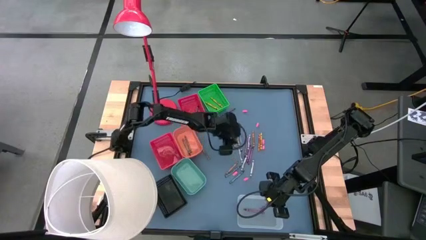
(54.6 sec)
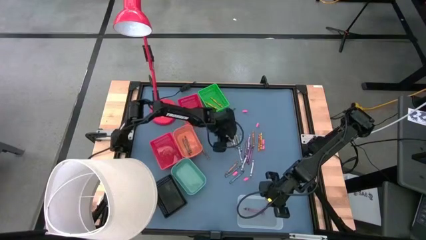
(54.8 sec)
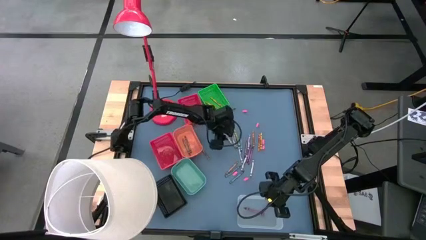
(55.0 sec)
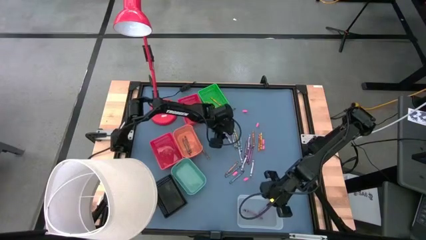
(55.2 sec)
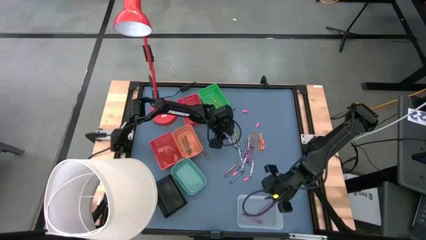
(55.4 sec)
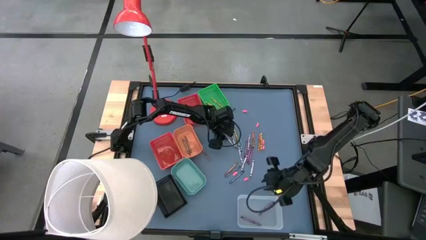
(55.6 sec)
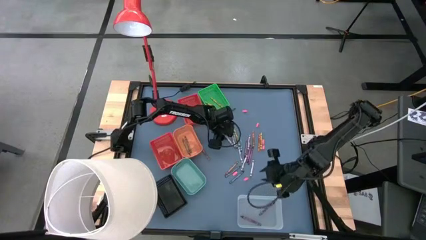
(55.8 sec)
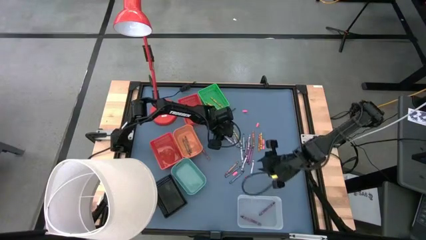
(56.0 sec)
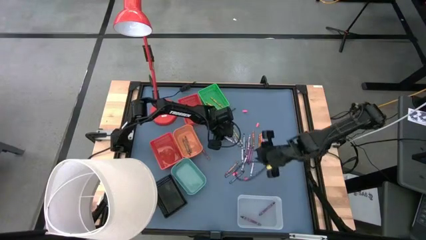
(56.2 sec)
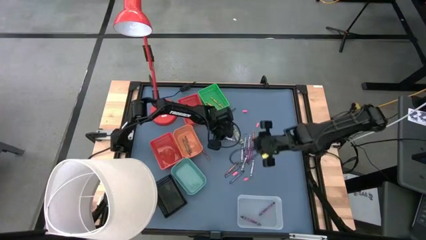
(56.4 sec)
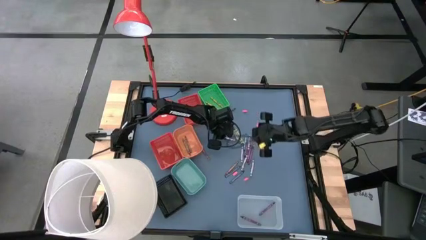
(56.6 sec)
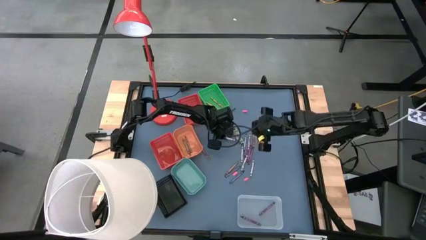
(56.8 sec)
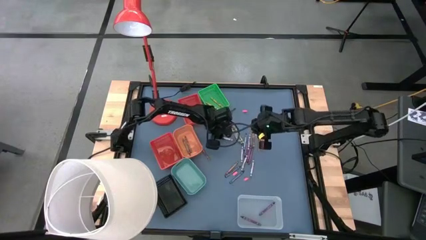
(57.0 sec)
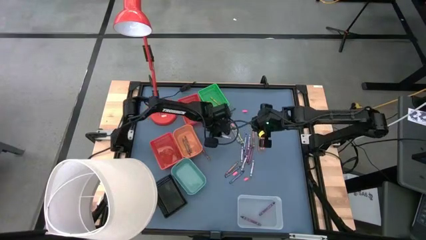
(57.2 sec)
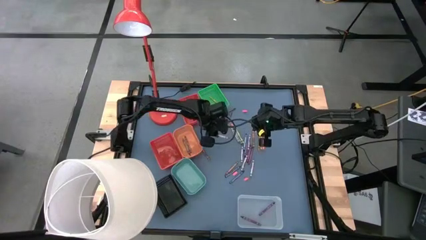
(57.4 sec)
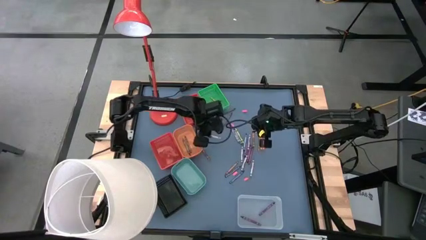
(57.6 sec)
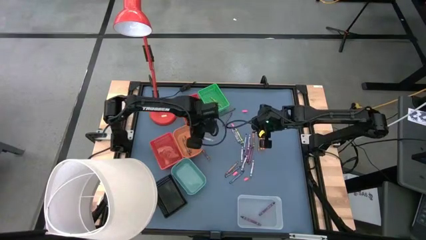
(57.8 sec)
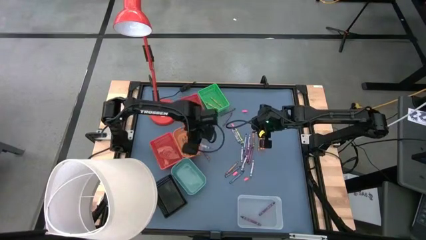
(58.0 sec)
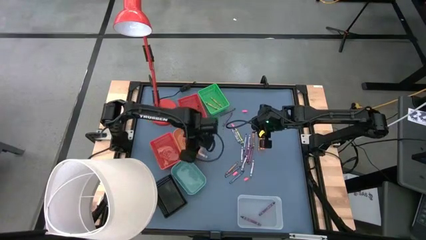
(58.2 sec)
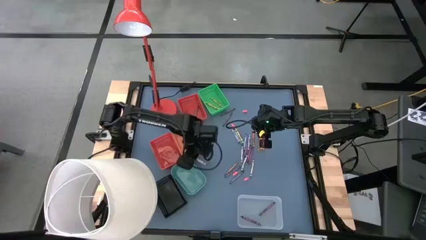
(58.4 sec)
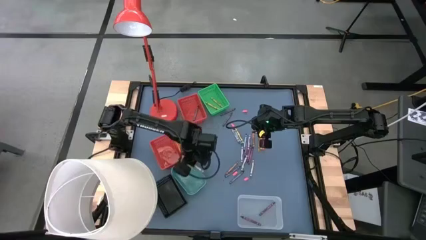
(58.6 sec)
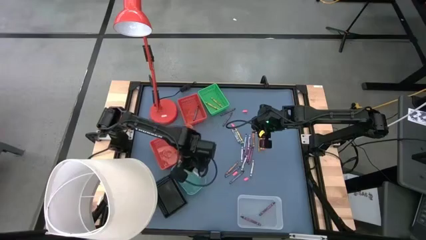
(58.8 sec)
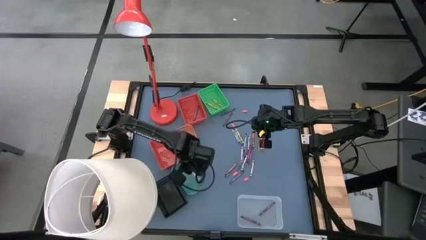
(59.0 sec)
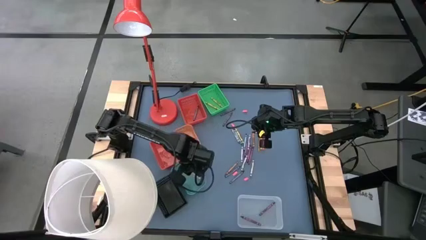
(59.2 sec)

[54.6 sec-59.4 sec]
Task: Sort crayons
Put the gray crayon into the light green bin

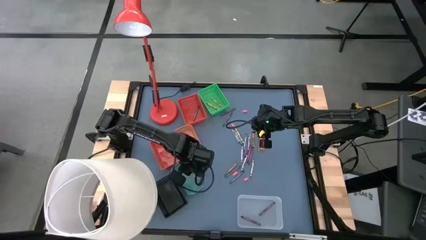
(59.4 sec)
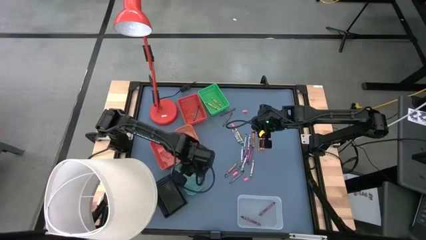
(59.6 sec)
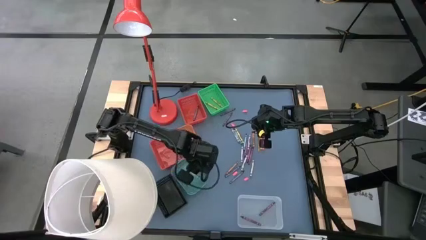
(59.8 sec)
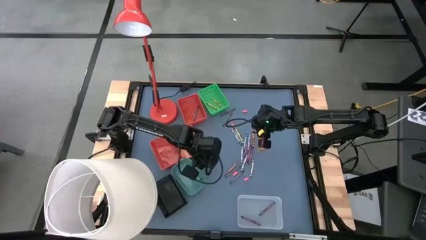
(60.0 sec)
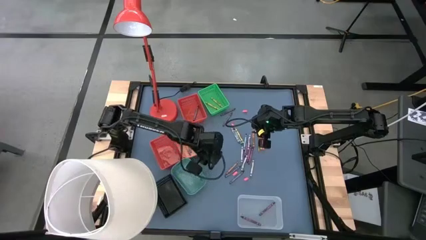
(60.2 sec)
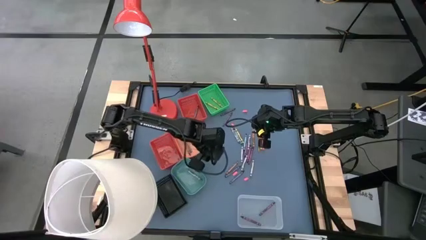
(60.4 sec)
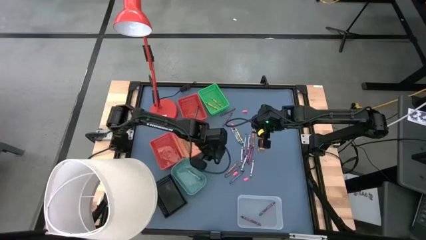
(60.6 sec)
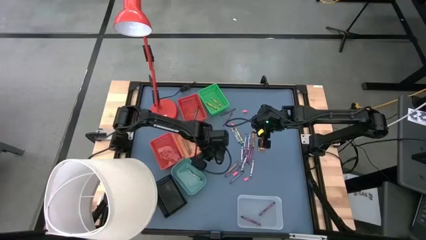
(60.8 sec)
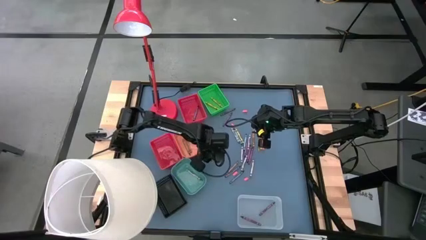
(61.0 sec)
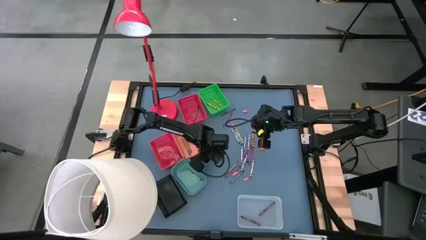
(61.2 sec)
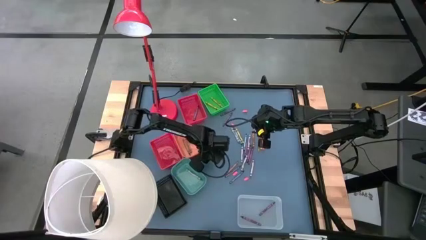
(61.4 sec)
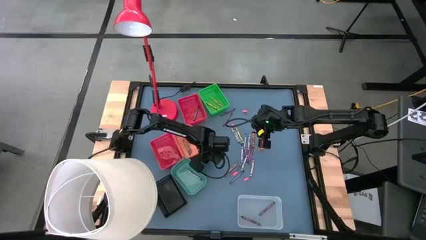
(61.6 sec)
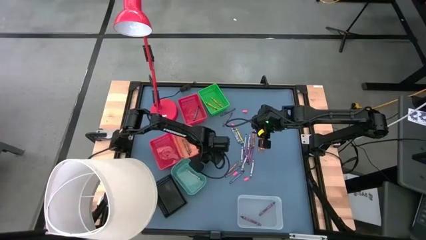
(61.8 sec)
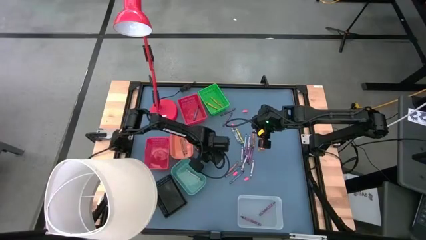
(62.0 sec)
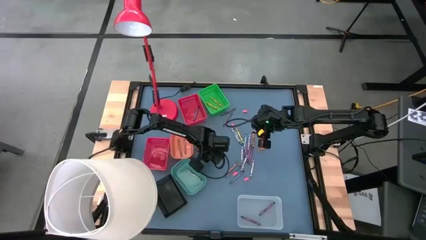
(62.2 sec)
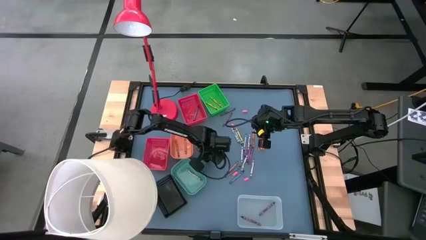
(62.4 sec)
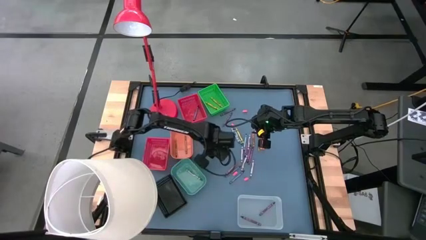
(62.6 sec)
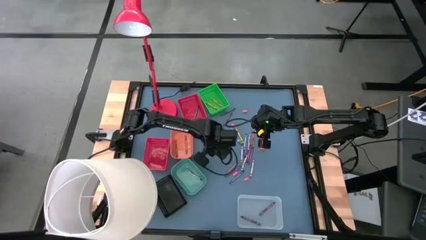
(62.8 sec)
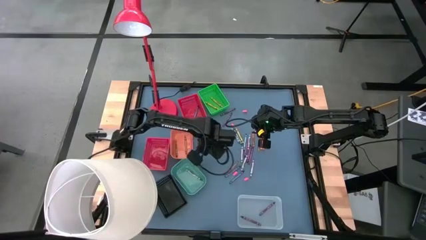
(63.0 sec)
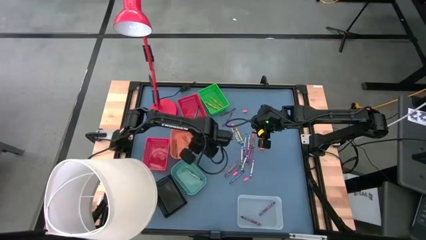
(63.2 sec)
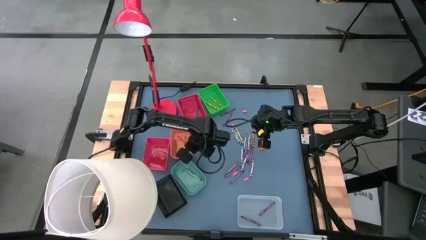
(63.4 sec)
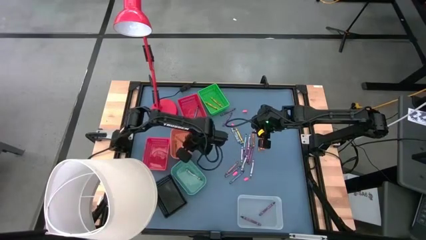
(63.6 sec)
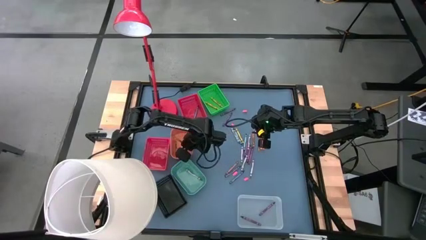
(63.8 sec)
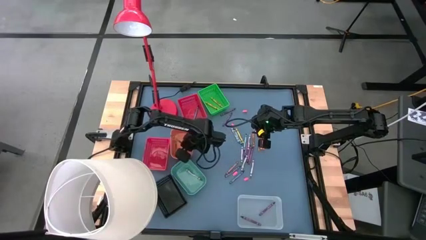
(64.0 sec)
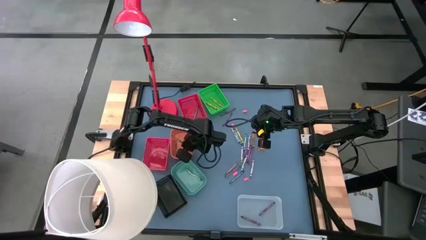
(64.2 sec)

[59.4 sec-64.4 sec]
Put the brown crayon into the orange bin

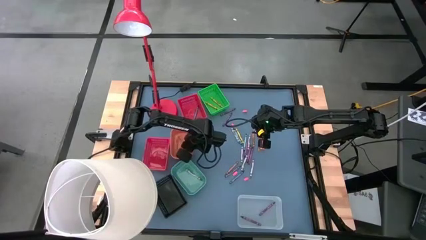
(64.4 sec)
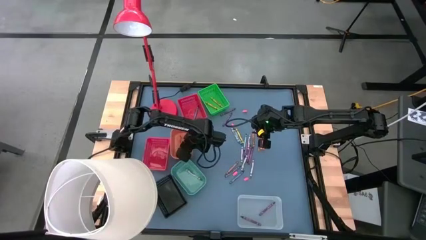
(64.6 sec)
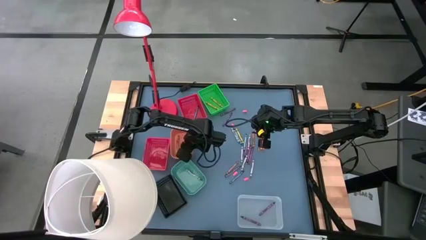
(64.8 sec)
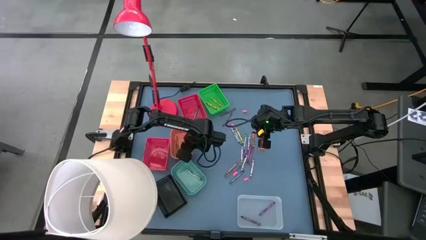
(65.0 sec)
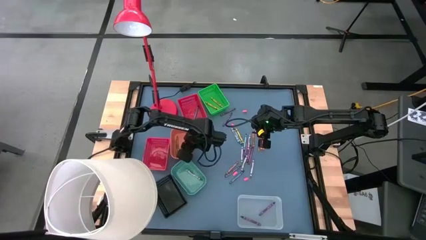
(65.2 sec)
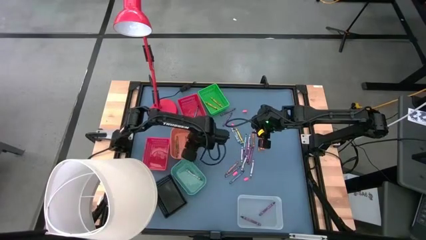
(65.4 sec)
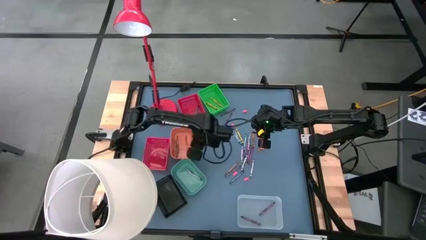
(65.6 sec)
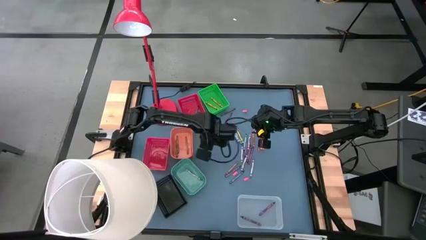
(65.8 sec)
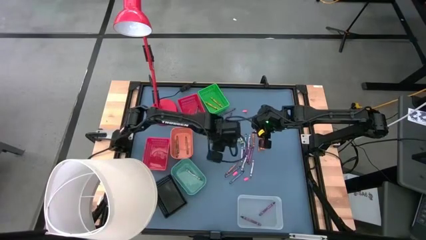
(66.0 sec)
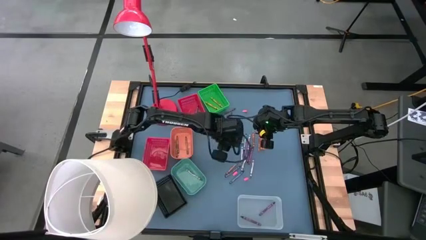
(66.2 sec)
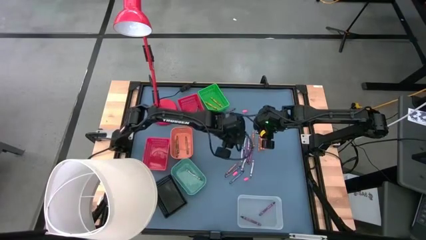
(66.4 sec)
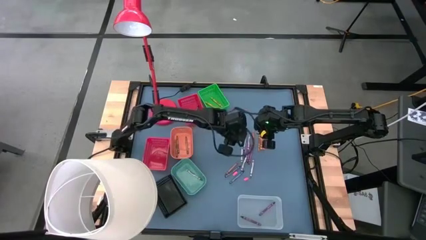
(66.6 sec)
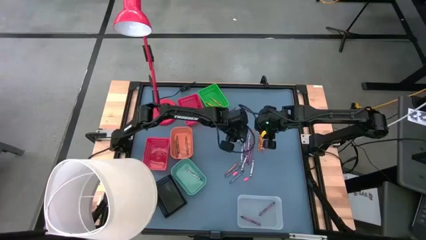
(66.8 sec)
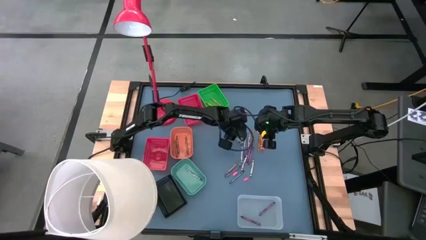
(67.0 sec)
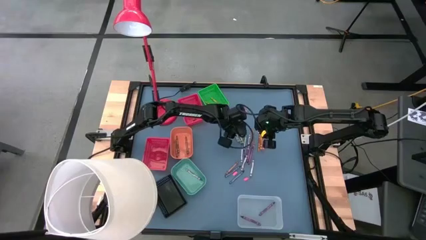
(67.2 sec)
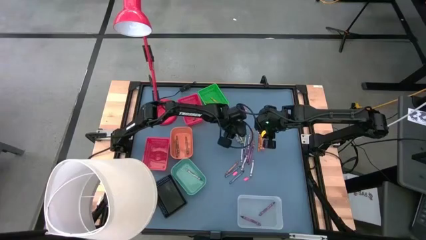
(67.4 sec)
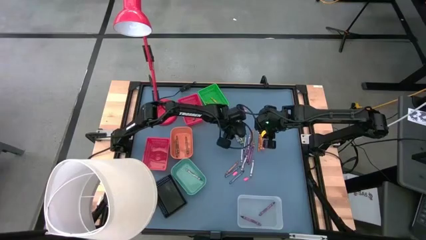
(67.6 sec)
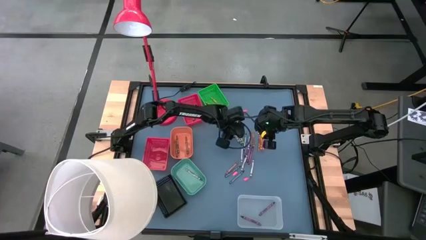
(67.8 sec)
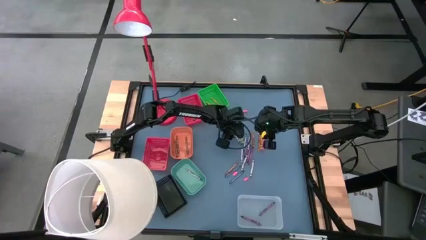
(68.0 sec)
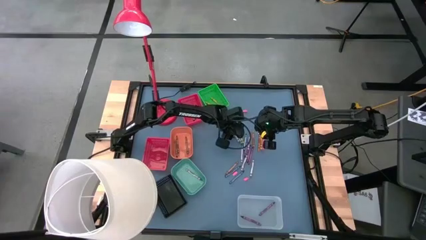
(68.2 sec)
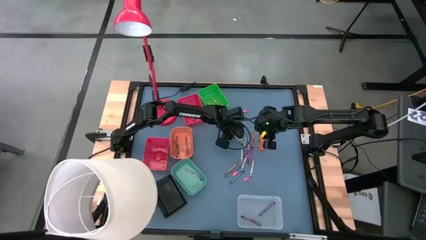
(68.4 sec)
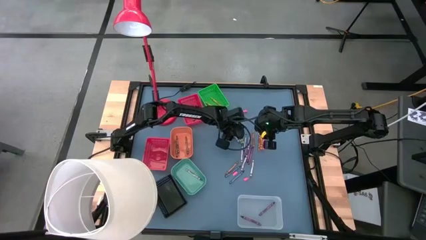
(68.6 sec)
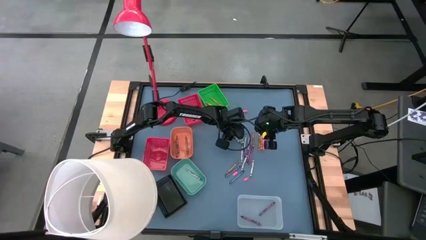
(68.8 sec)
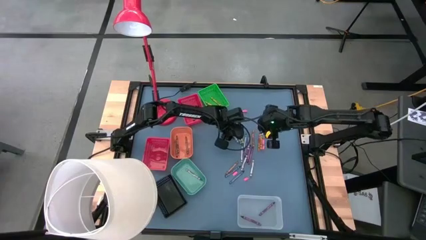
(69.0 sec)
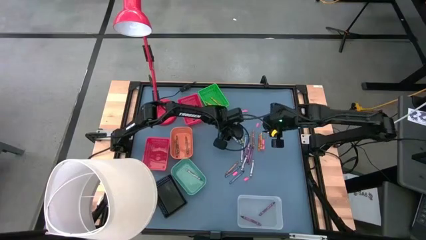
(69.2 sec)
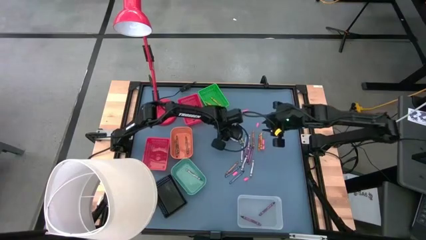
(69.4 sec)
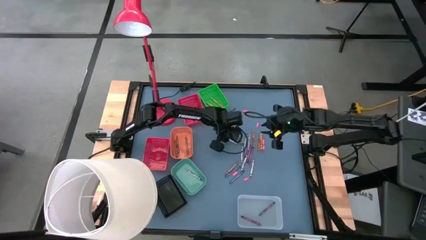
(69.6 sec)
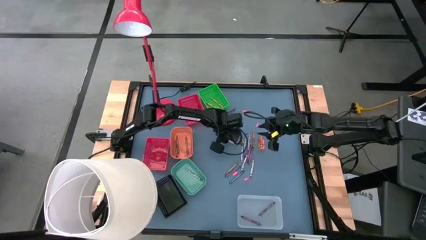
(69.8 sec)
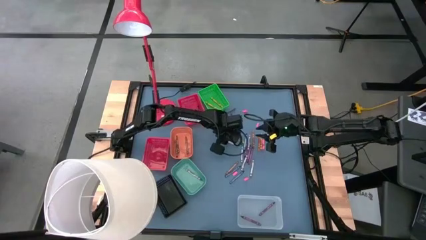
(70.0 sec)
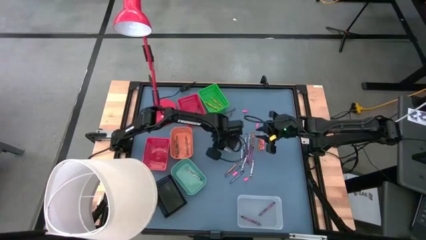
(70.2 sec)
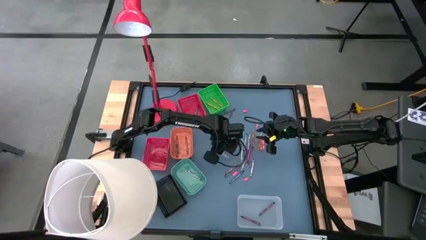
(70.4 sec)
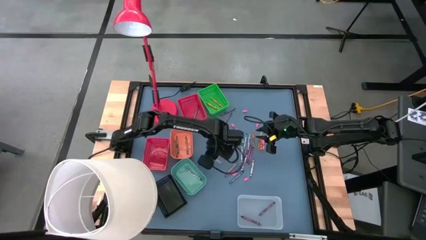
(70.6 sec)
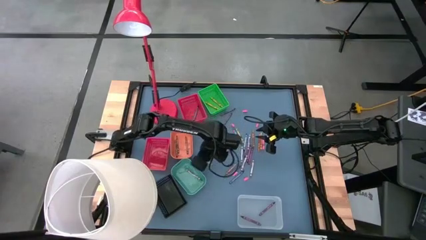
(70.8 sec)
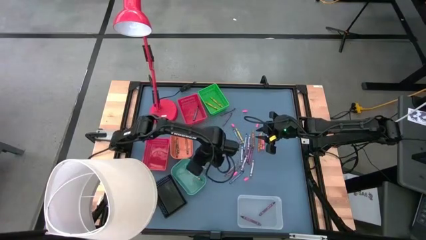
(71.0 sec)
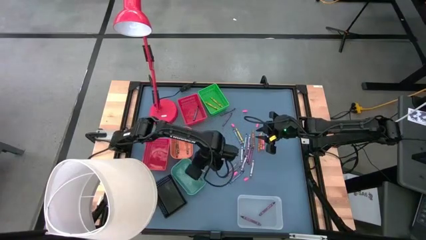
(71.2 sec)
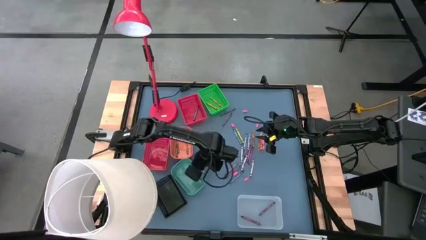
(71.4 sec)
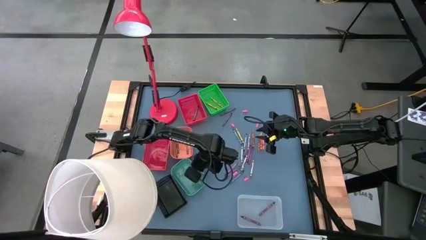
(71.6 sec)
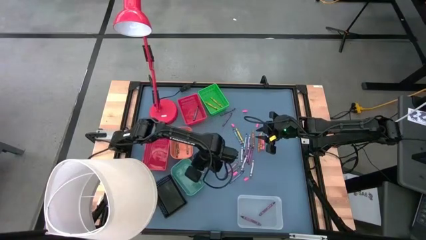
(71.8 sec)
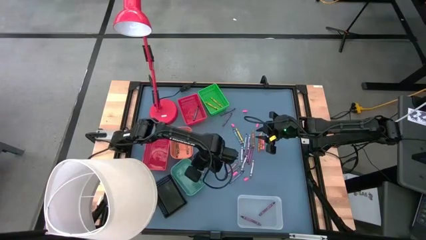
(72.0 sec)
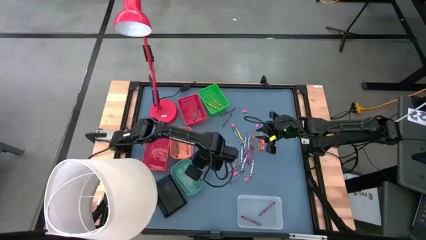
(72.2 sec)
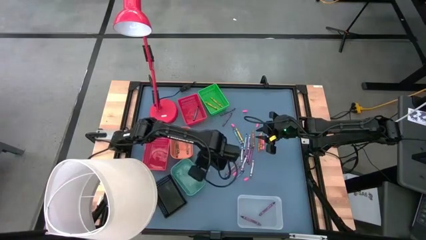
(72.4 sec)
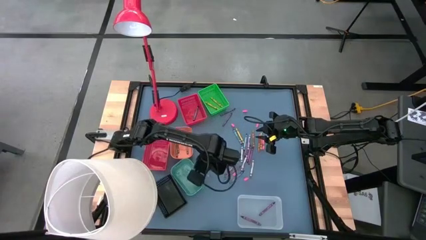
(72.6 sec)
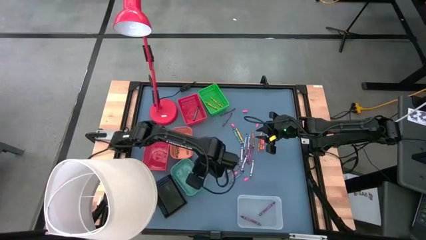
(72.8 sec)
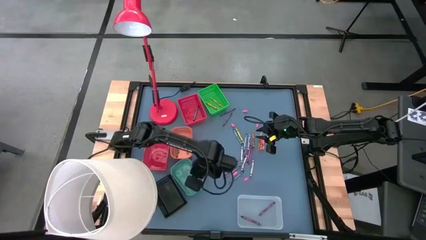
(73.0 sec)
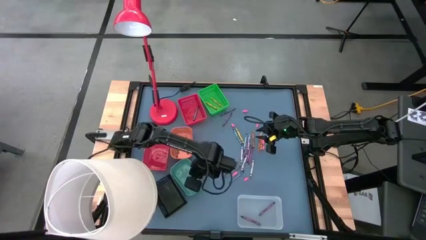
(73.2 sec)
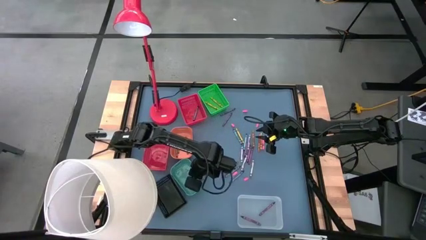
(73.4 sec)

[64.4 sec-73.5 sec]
Put the gray crayon into the light green bin
